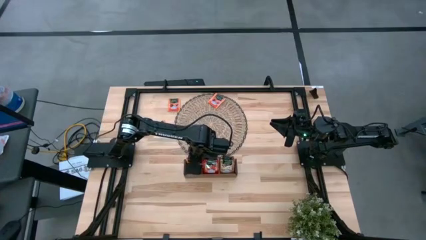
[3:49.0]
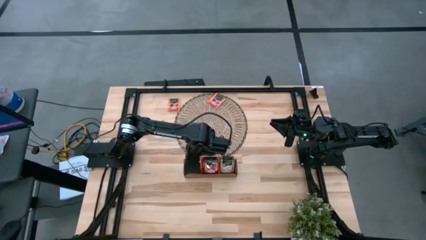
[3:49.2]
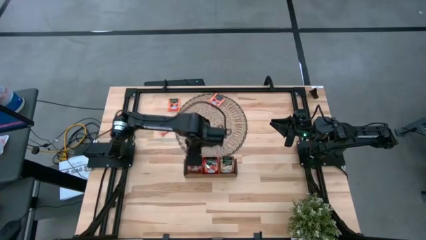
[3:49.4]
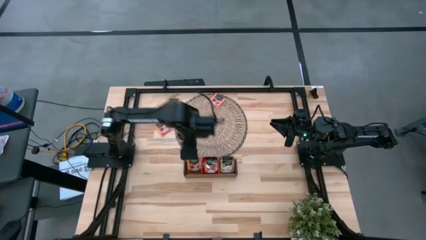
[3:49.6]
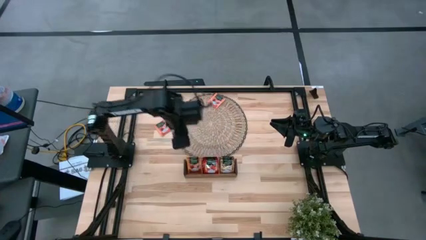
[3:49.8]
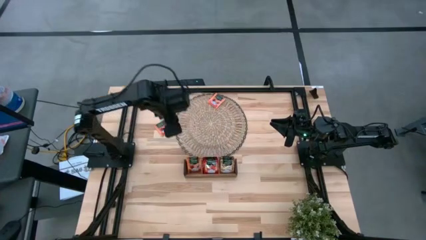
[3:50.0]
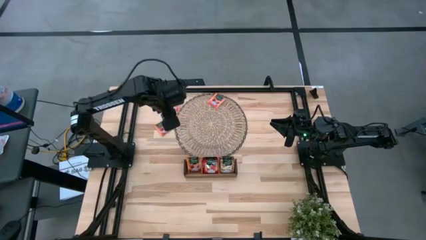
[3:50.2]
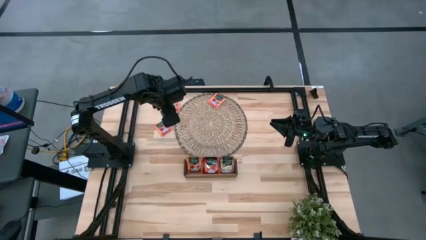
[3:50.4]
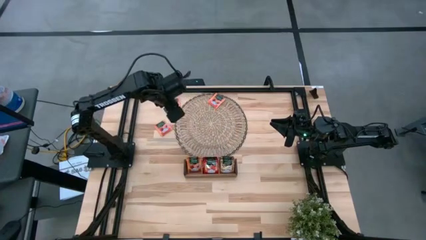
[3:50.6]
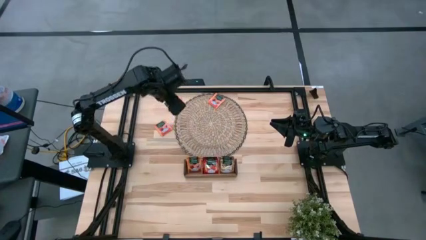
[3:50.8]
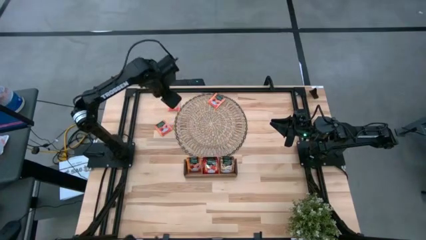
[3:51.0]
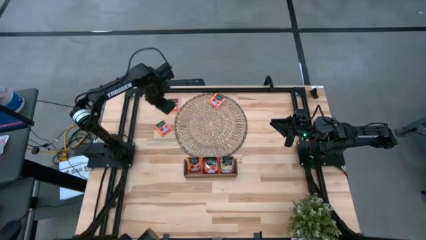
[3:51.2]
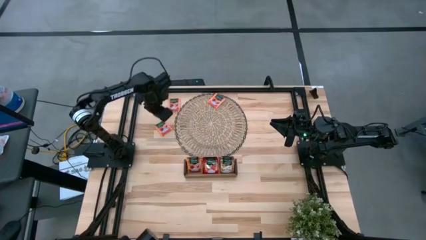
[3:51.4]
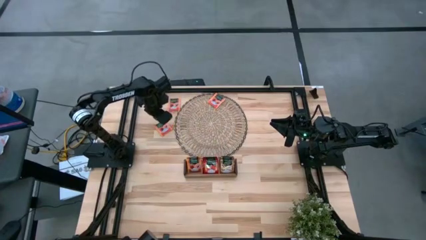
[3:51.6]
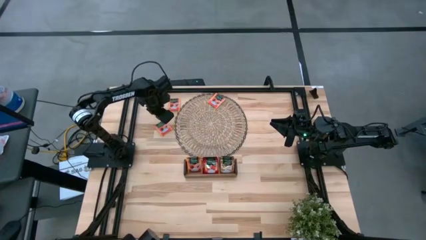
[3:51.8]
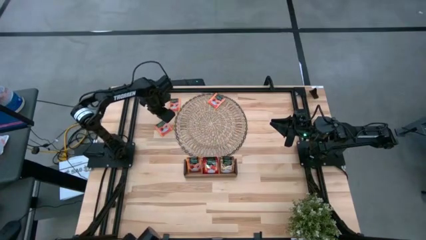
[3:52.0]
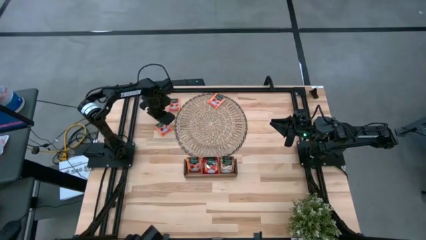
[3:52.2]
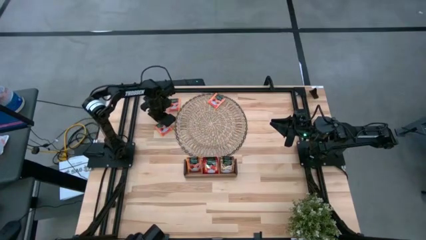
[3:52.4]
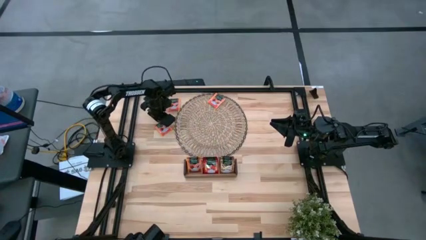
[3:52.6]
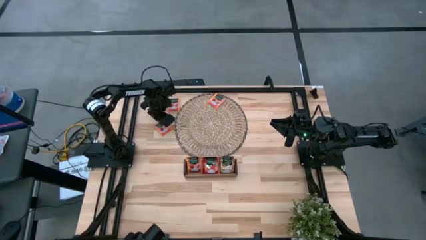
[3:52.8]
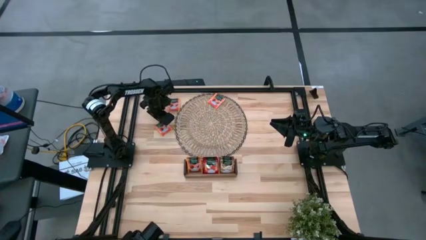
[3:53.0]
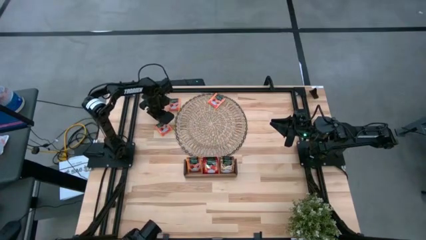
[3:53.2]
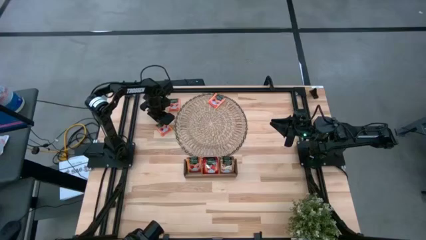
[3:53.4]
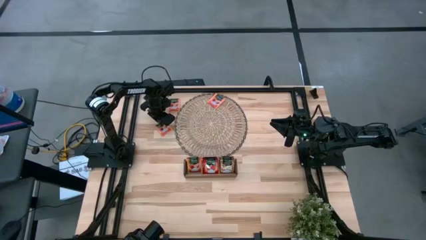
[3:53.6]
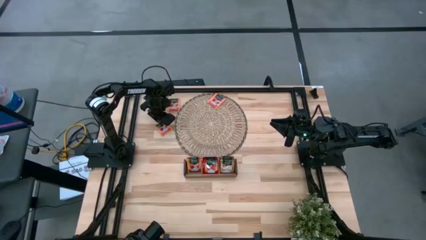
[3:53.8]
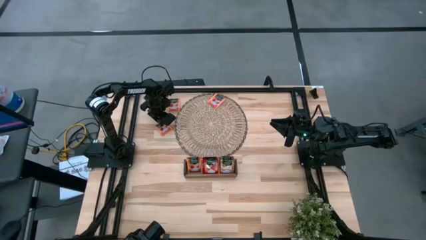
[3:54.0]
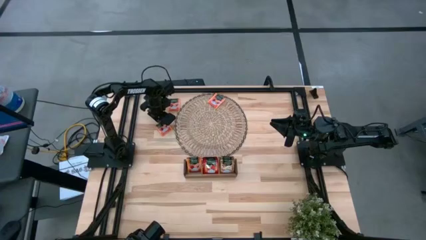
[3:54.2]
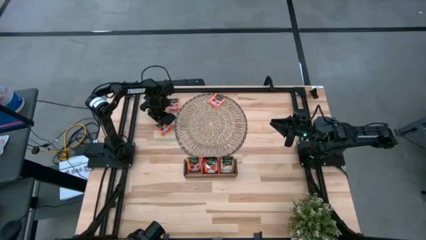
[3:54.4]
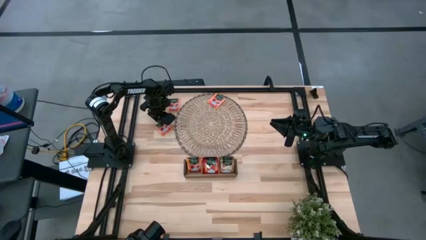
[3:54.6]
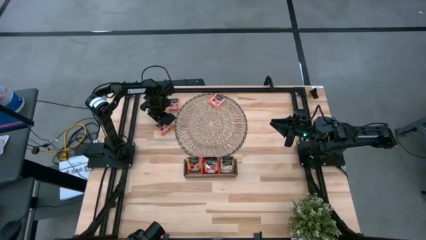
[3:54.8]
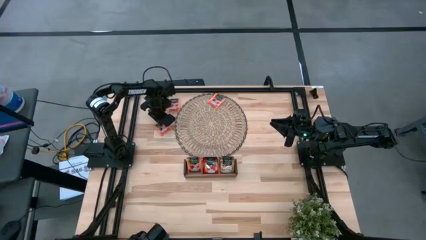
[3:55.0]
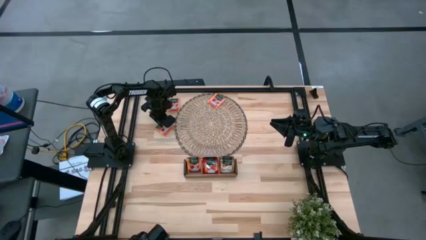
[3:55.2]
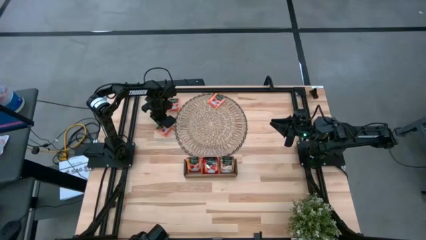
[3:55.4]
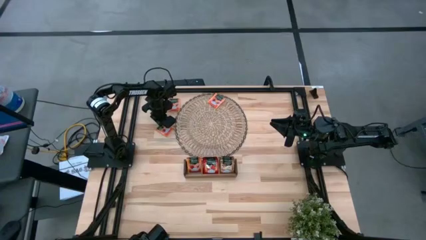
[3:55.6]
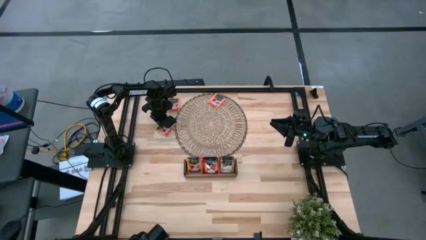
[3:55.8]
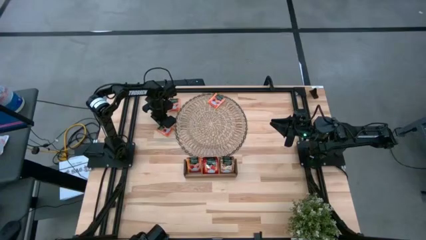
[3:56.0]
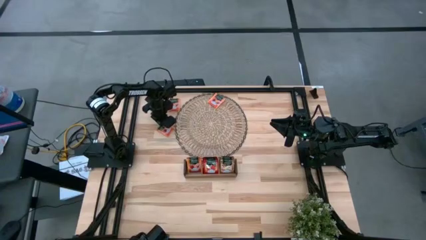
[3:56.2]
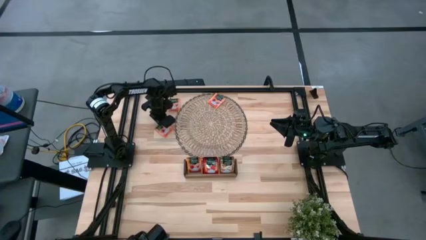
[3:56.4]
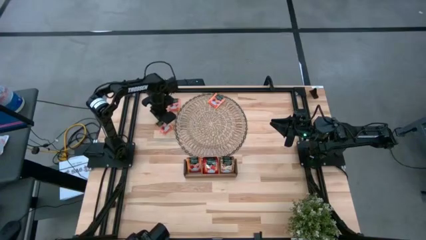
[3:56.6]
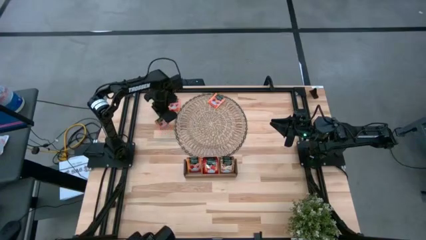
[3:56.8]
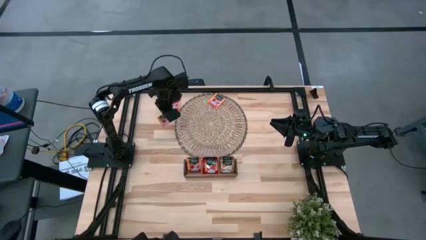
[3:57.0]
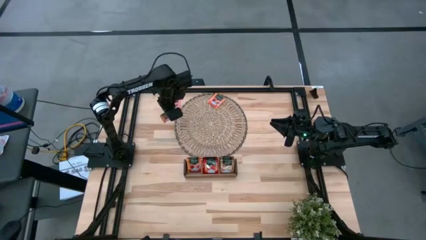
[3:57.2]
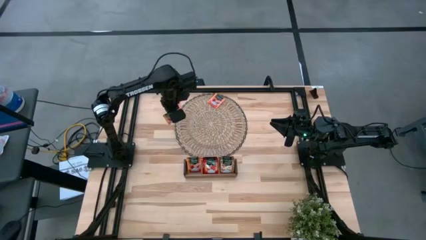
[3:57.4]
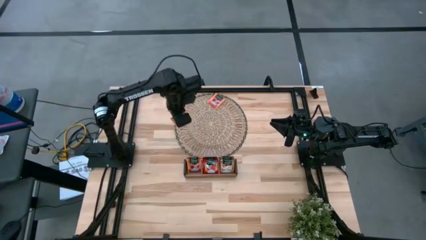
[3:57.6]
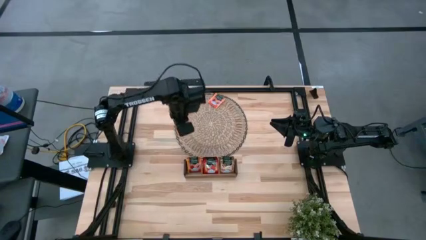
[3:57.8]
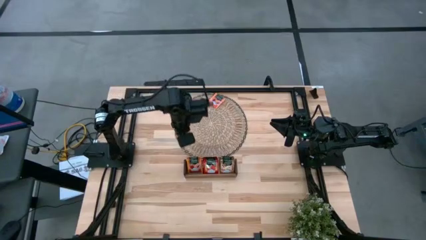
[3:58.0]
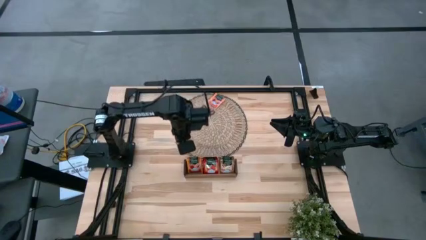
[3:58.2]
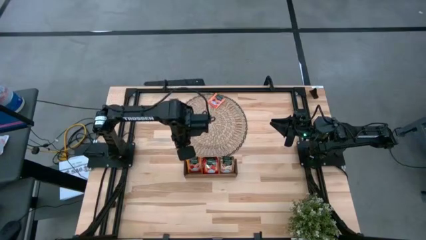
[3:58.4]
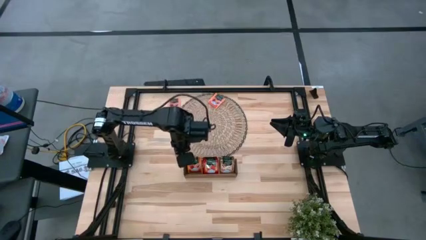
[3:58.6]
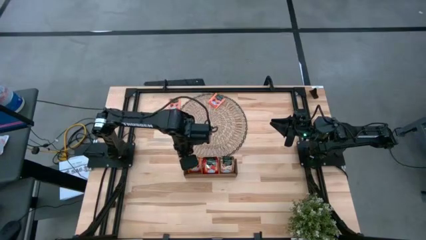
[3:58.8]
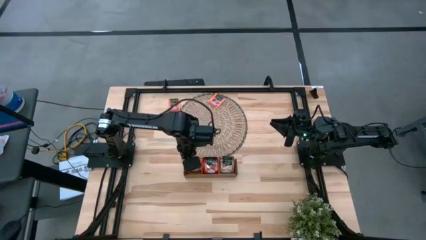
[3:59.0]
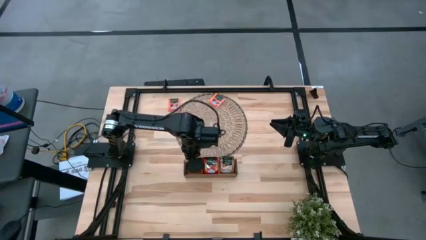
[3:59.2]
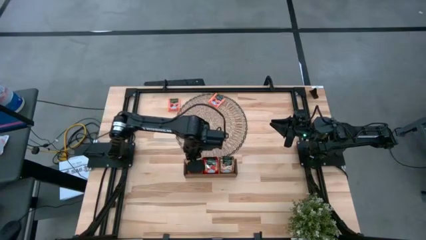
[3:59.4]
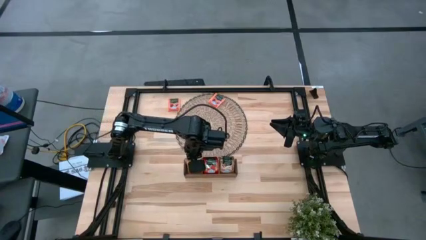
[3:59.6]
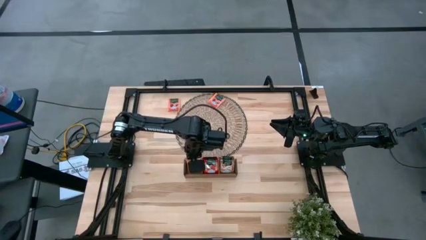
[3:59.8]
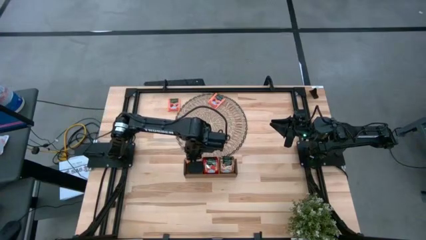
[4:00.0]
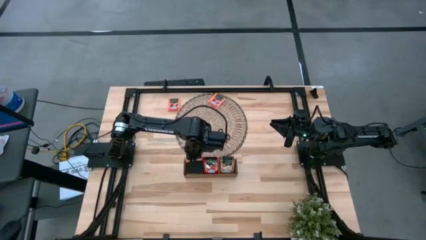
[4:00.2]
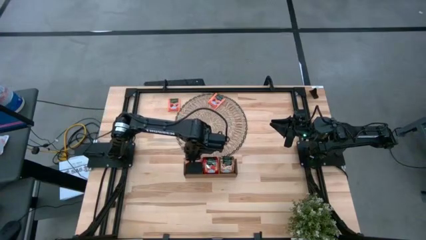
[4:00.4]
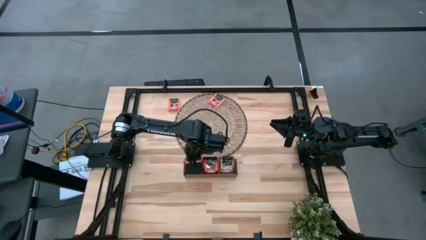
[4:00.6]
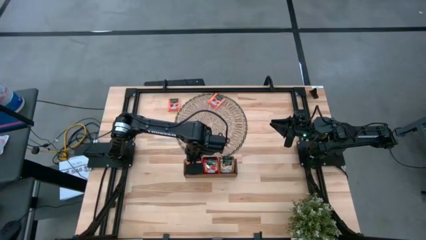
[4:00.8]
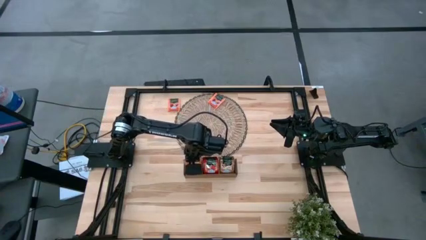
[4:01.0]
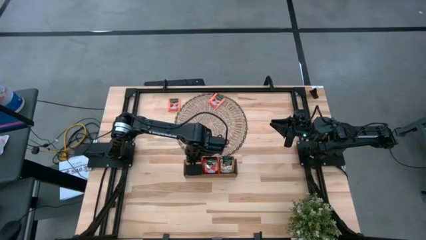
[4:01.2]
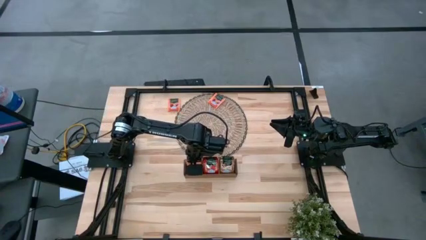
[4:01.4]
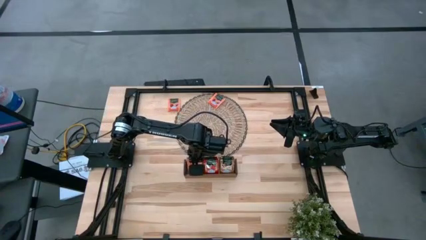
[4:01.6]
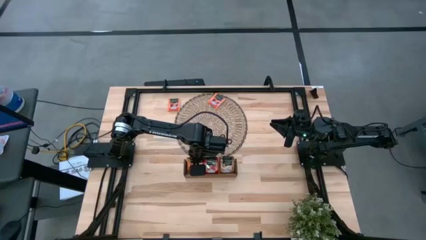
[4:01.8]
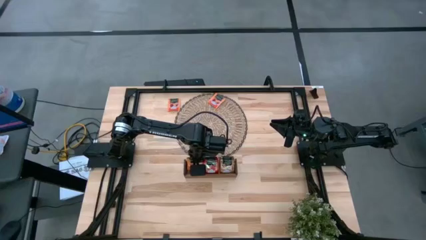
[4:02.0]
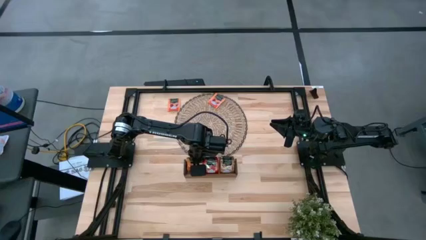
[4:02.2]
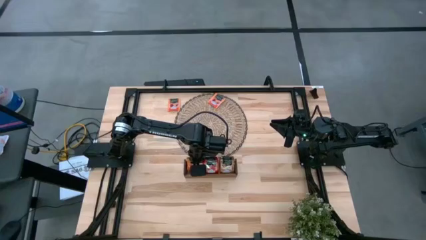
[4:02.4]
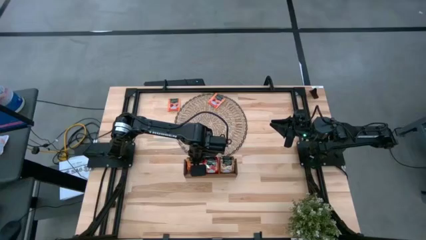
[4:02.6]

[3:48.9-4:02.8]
Task: Pick & Place Tea
Put the orange tea bag into the left section of the wooden organizer
